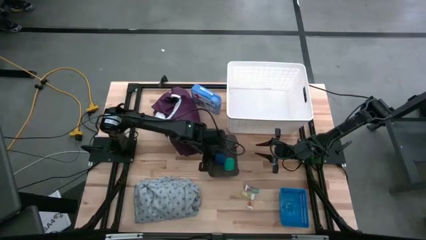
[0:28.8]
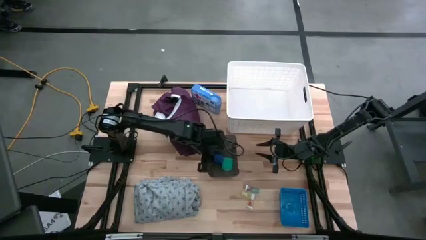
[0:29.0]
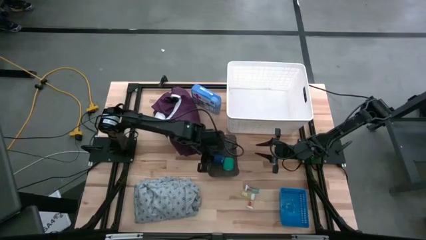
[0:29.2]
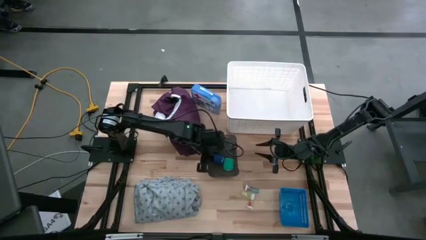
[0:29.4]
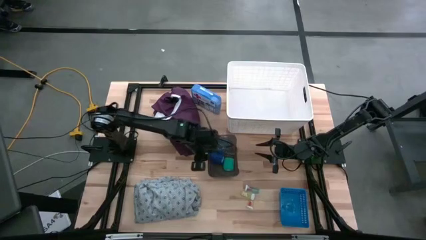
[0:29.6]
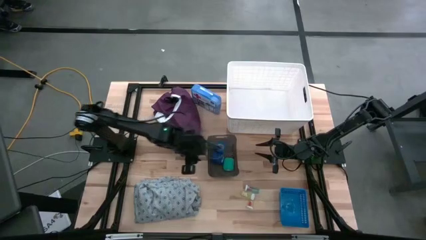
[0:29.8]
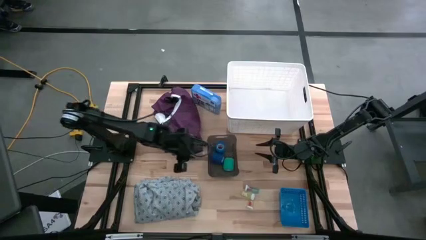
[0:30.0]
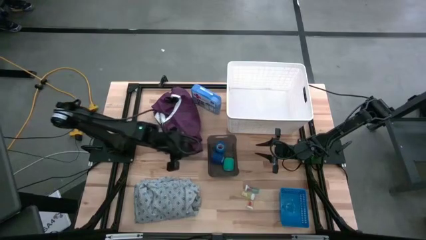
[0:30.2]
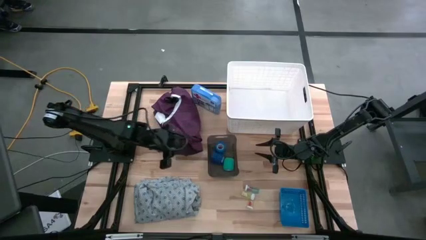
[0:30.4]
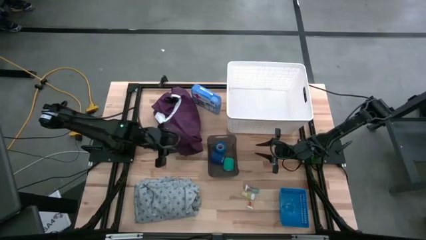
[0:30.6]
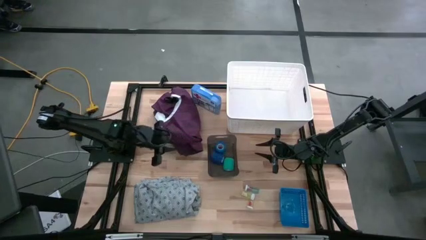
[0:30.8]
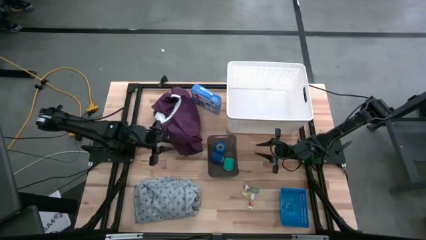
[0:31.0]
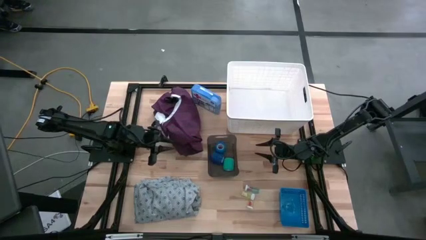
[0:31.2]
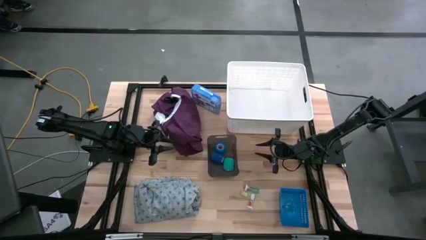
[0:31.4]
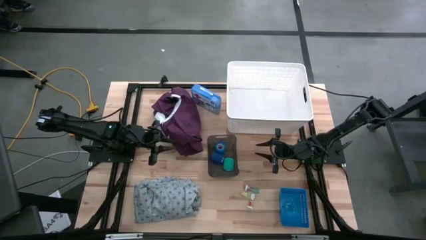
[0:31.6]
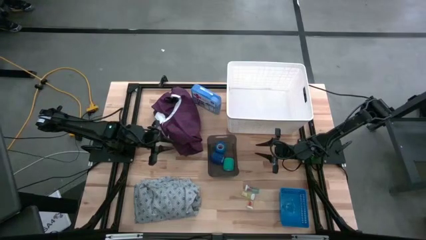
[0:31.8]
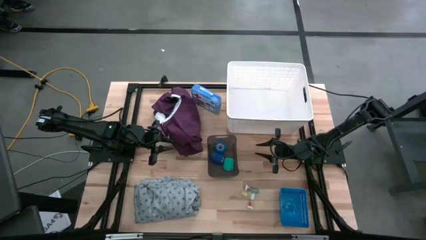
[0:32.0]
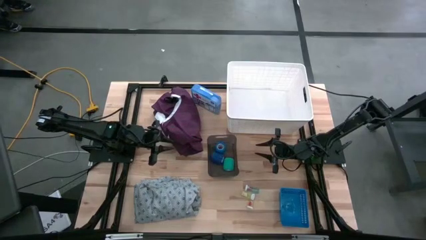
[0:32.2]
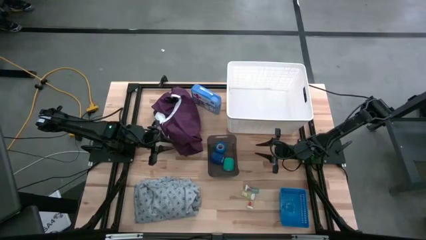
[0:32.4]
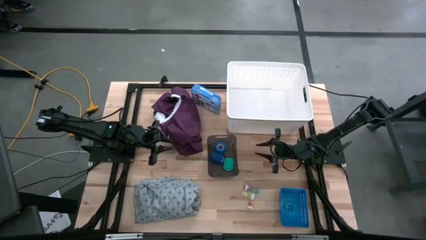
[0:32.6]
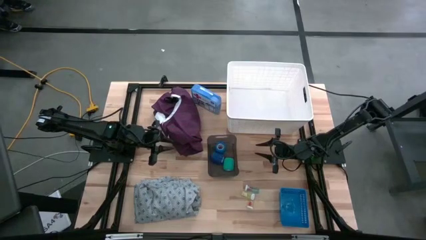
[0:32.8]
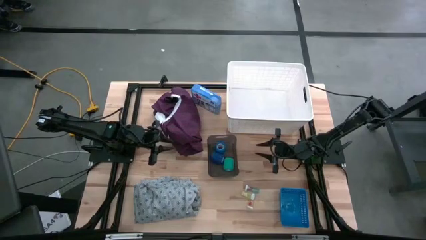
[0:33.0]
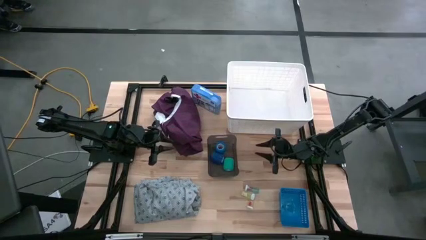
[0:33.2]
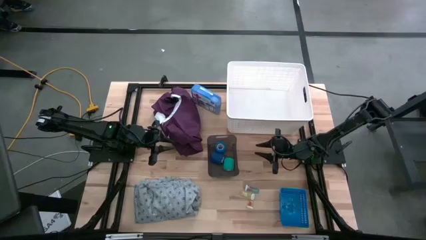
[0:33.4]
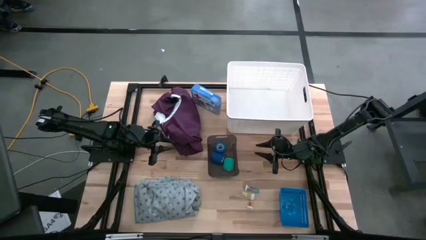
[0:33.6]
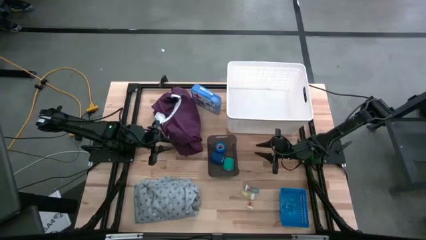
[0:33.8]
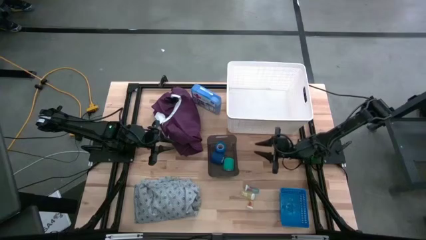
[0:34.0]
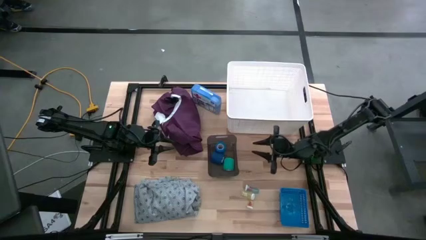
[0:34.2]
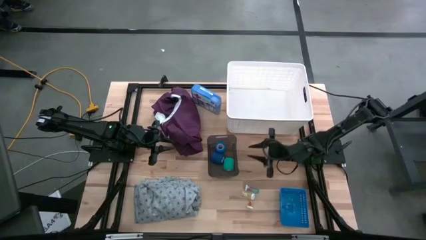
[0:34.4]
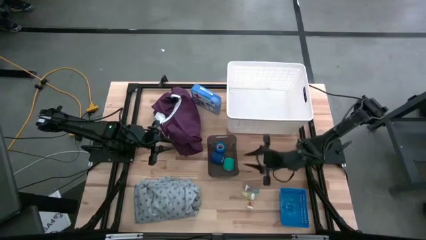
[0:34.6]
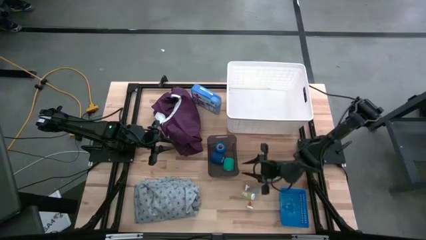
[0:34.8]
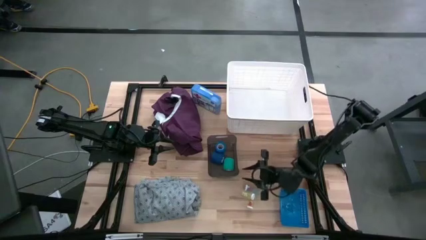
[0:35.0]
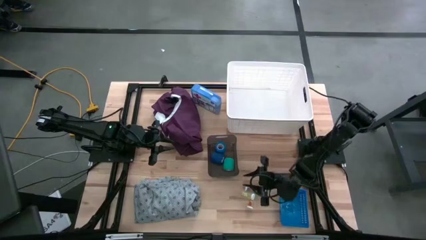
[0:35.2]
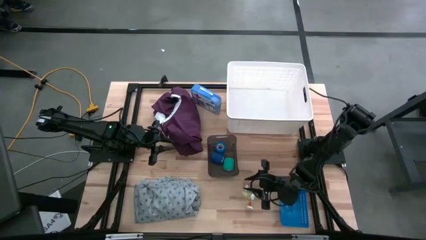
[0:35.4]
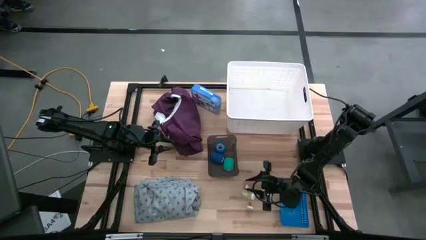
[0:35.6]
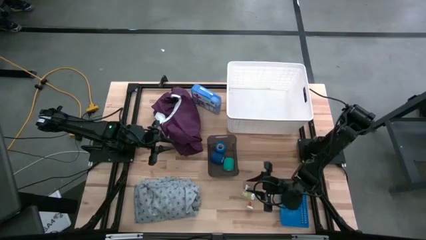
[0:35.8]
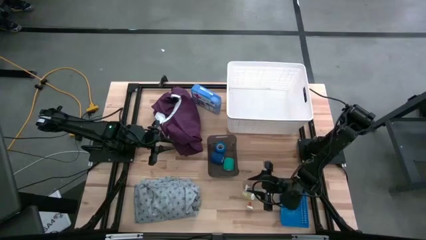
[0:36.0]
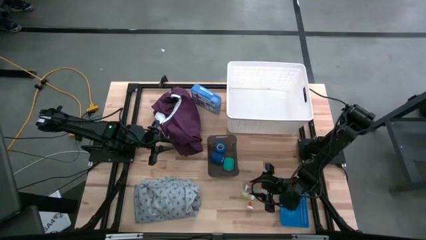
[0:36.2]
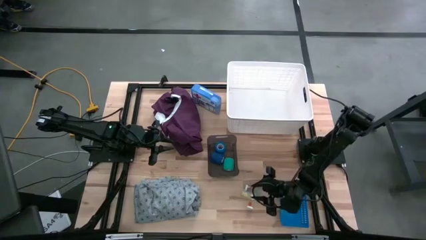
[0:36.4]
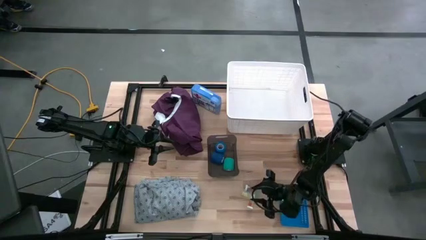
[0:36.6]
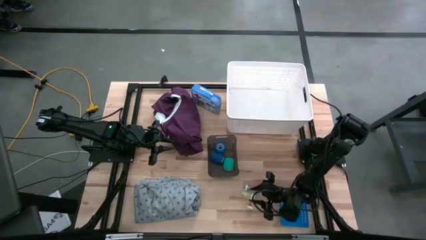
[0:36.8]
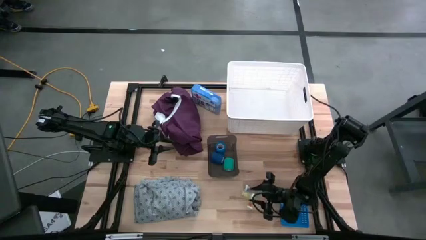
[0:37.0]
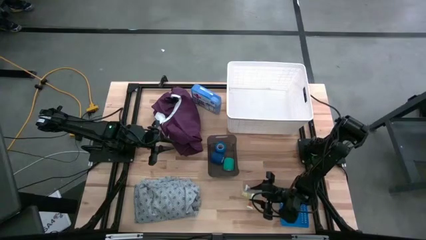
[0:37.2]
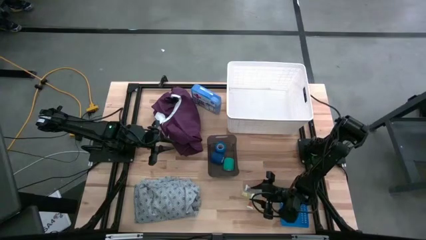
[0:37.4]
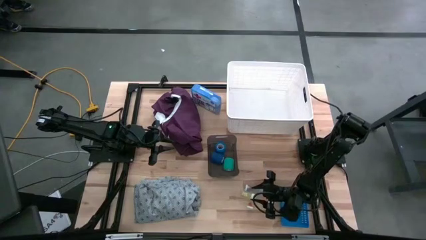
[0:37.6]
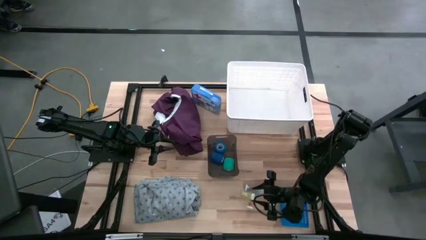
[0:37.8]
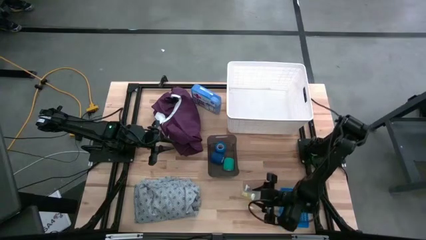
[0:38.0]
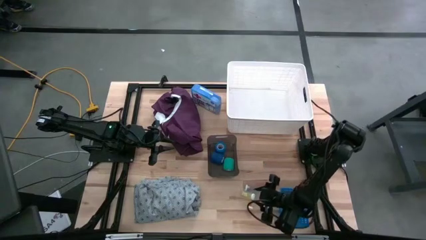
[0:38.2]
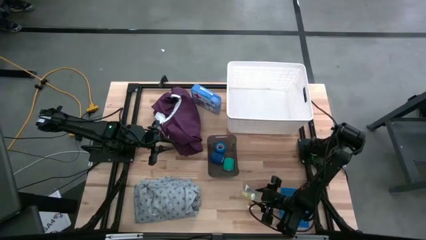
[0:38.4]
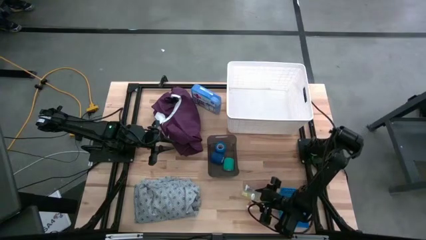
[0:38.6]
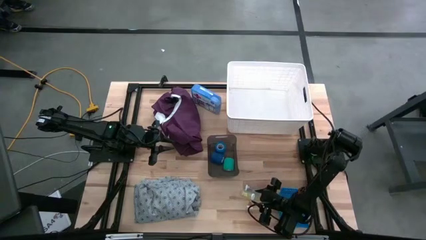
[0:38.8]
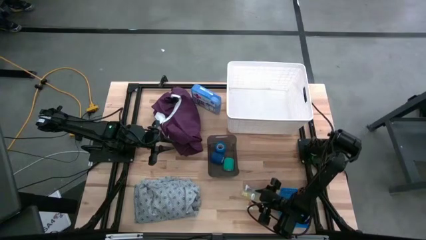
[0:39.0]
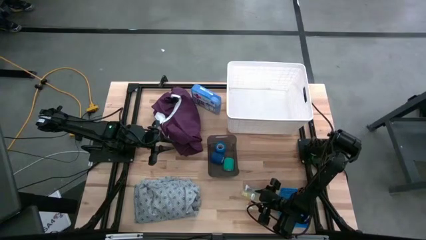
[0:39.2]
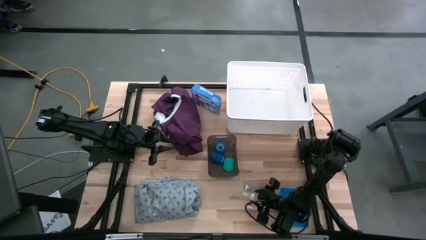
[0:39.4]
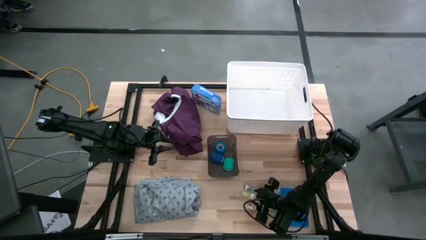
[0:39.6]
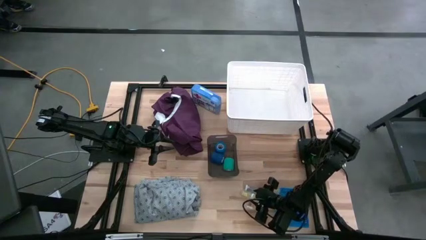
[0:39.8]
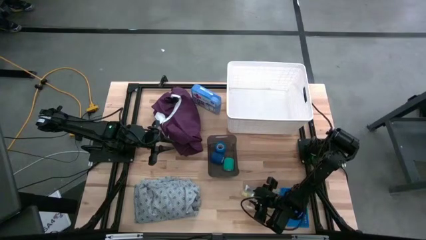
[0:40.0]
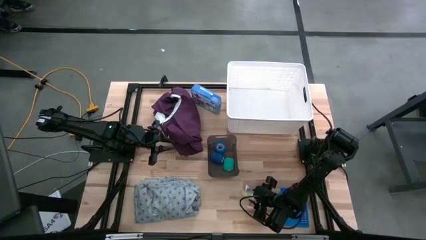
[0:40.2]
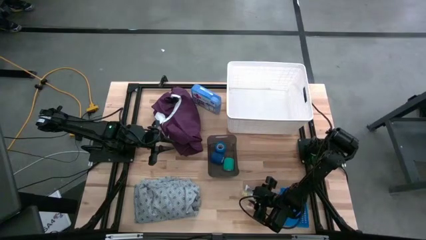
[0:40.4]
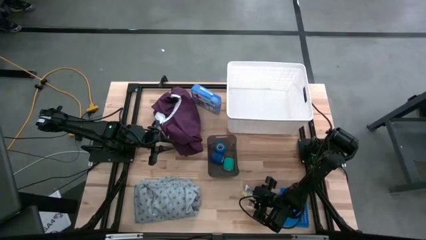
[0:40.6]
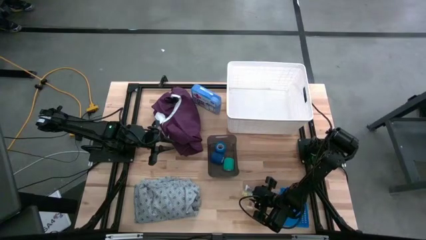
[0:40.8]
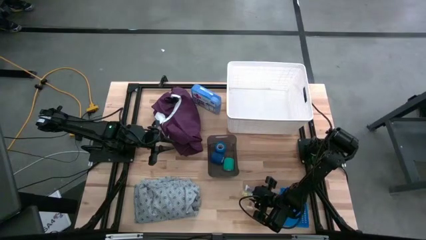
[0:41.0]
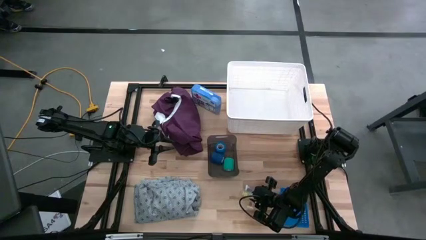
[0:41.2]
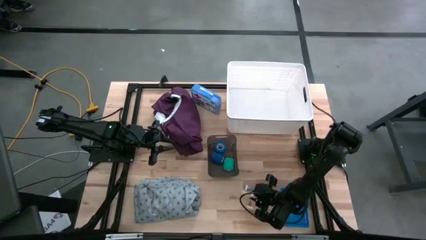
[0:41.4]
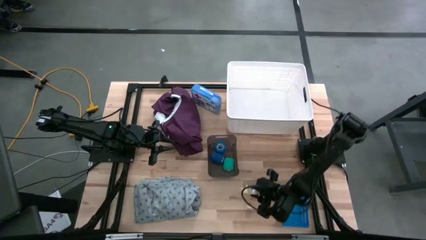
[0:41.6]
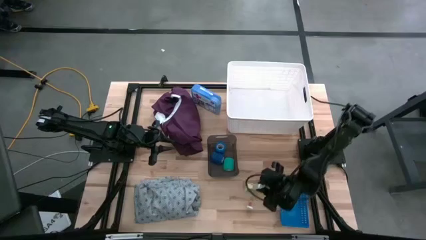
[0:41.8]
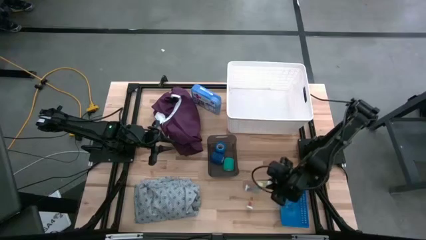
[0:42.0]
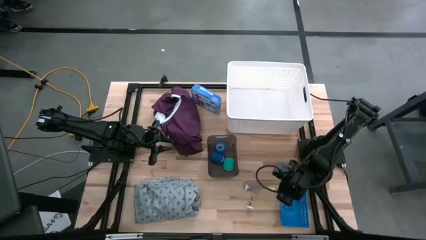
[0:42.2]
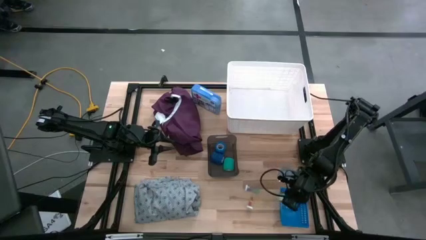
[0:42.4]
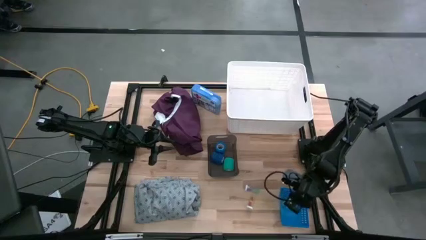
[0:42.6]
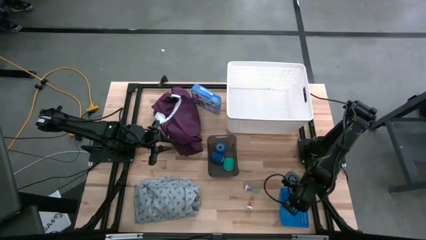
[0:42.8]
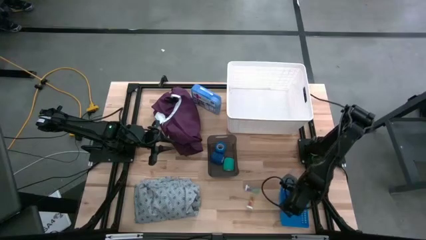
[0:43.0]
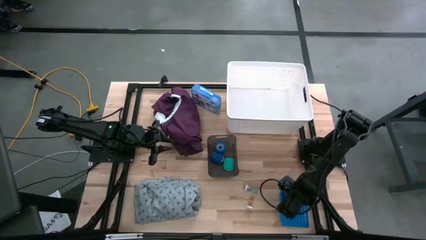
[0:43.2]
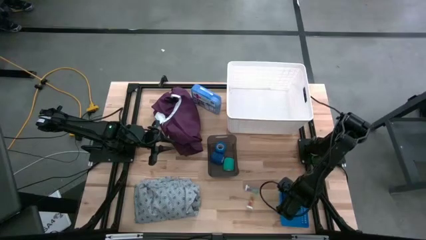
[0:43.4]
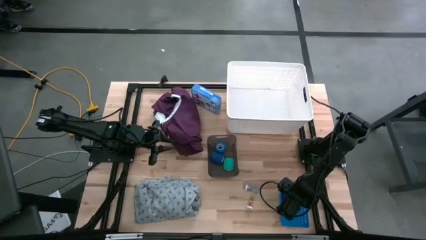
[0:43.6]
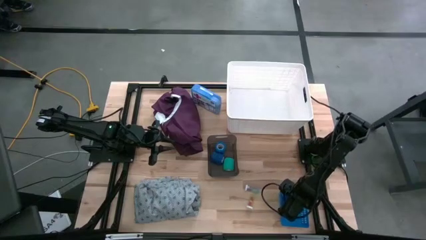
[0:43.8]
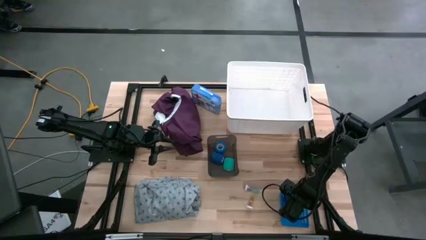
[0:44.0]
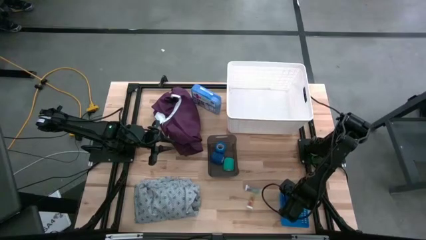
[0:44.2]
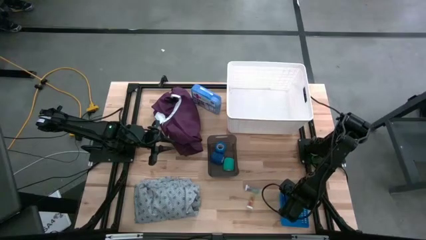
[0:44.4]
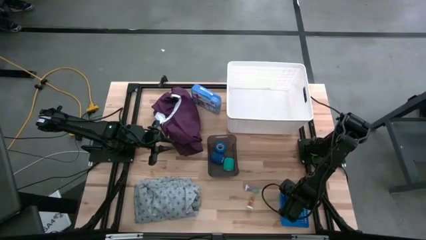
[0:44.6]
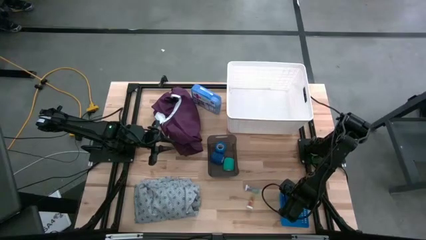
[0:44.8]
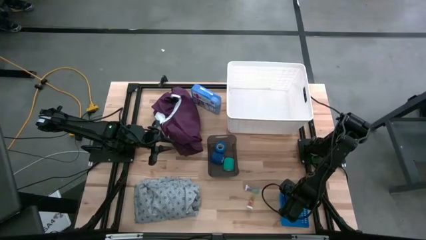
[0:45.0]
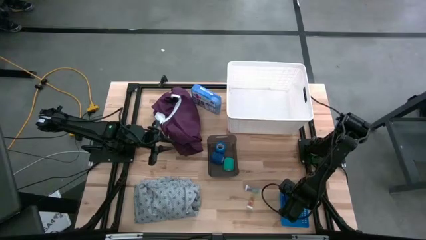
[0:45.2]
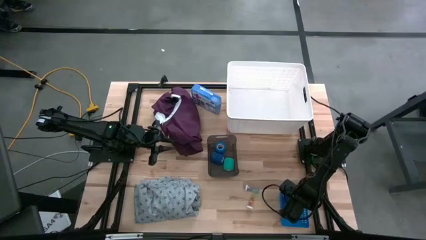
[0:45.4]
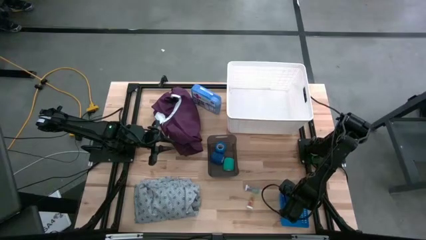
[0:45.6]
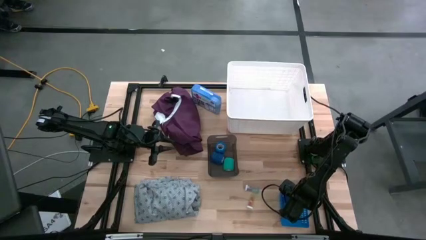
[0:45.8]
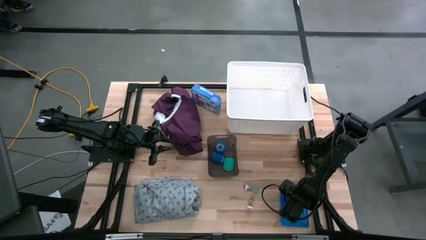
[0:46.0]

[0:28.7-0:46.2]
Task: Pick & Place Medicine items
Put the top yellow pill bottle into the blue bin
